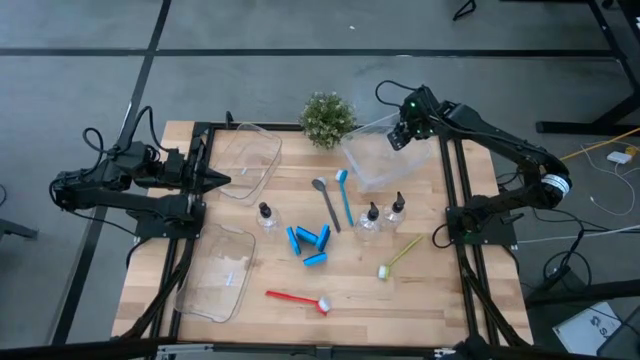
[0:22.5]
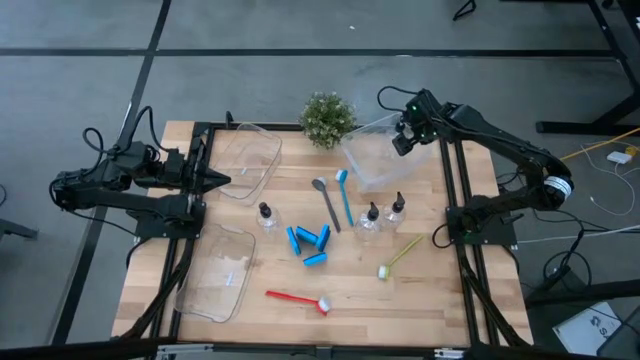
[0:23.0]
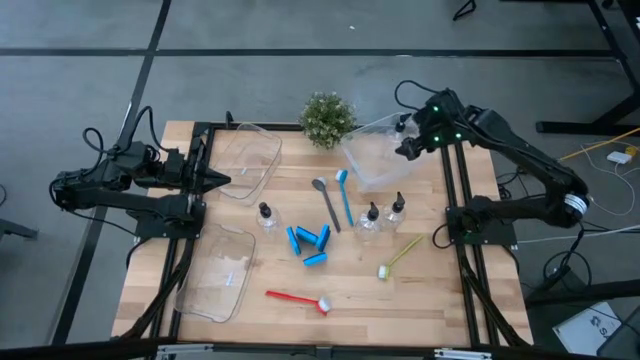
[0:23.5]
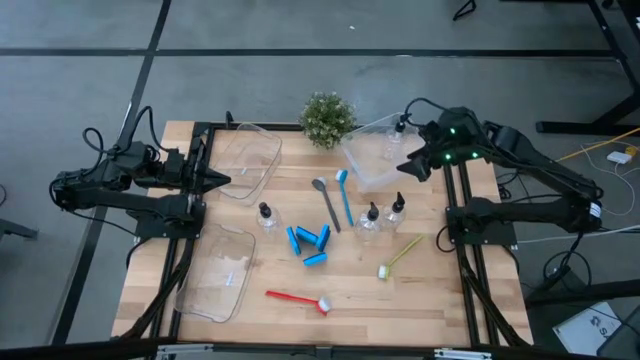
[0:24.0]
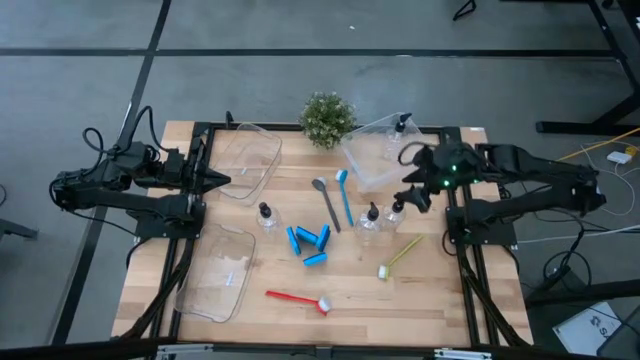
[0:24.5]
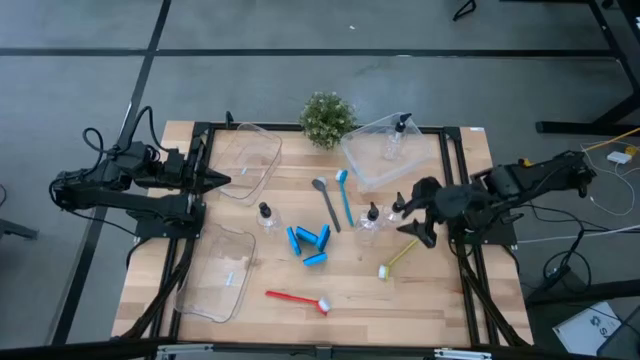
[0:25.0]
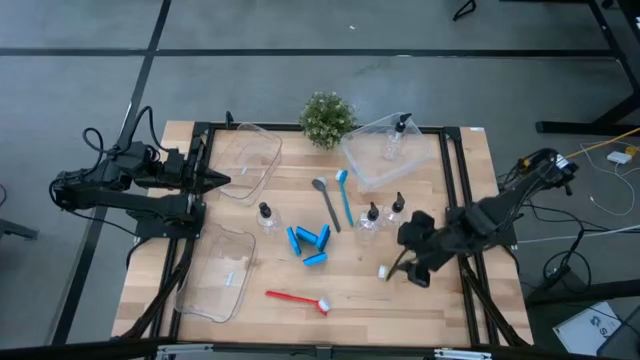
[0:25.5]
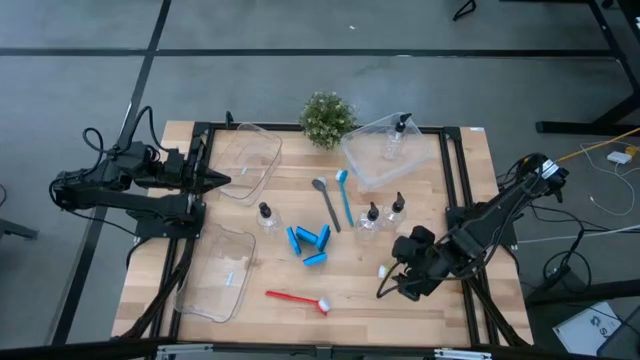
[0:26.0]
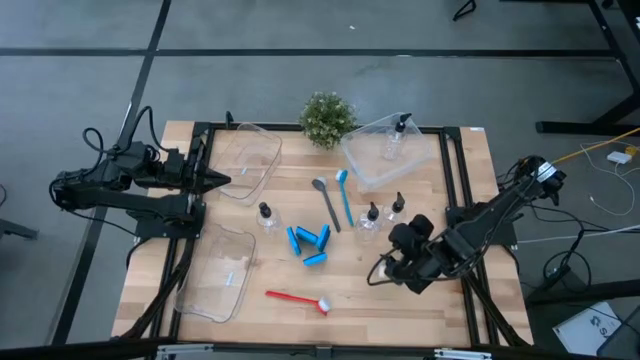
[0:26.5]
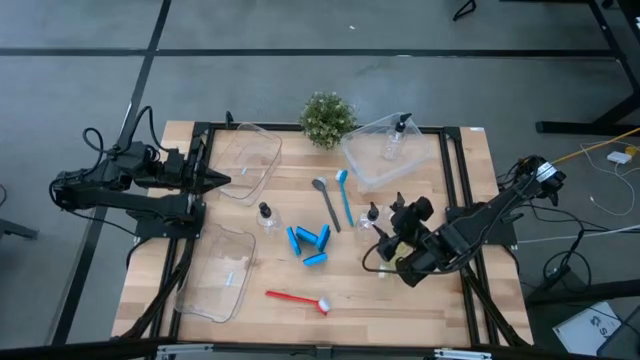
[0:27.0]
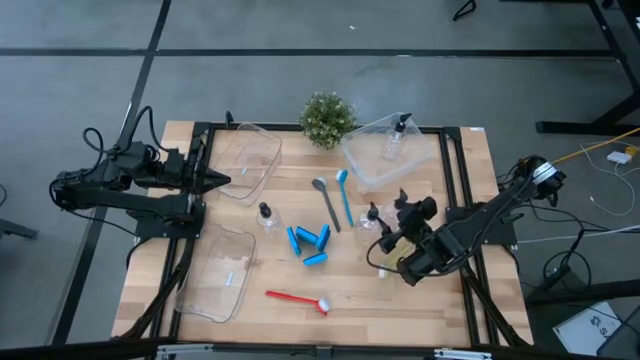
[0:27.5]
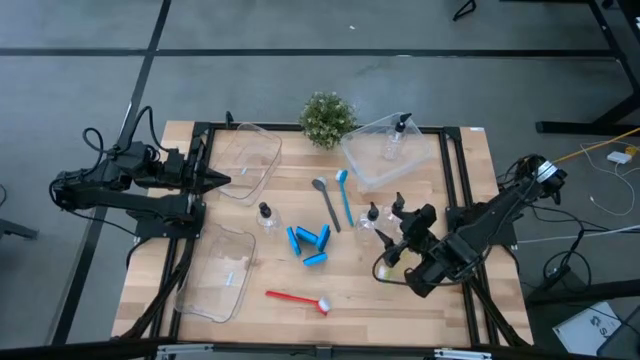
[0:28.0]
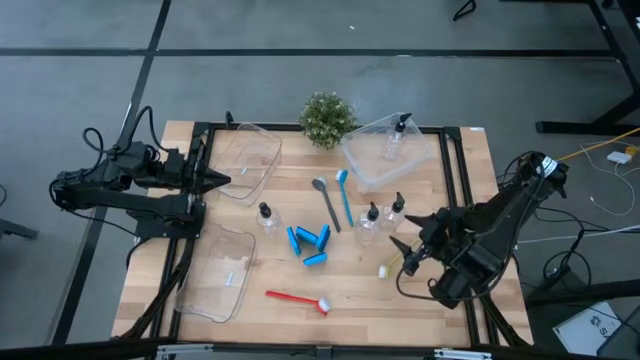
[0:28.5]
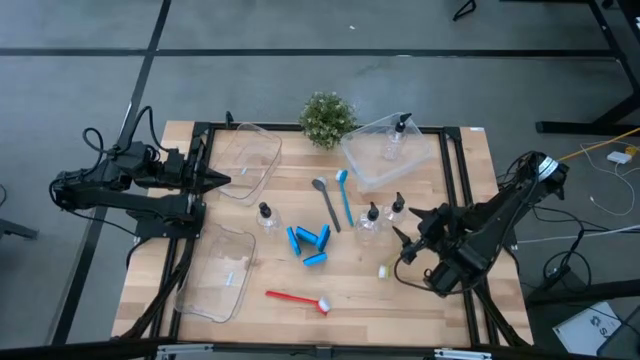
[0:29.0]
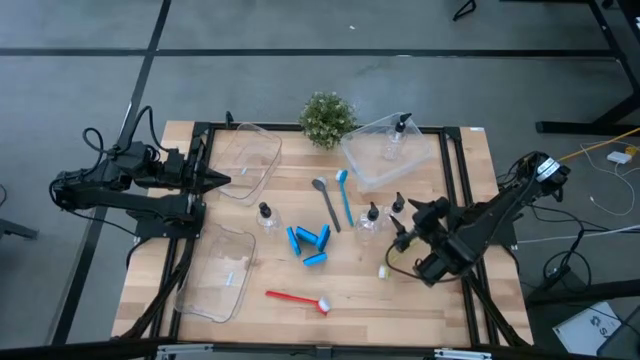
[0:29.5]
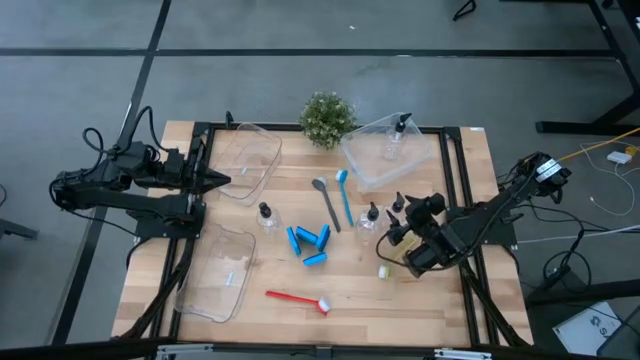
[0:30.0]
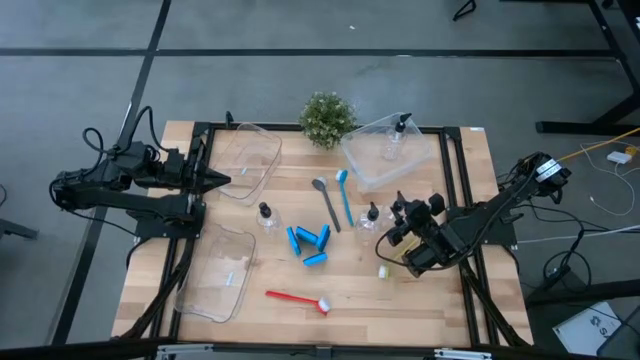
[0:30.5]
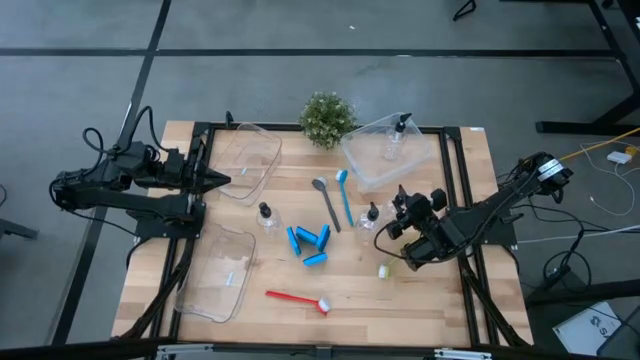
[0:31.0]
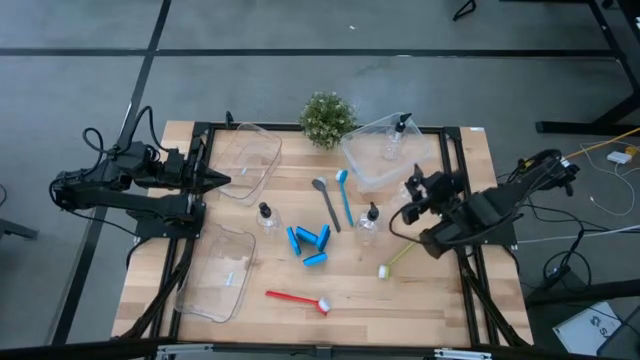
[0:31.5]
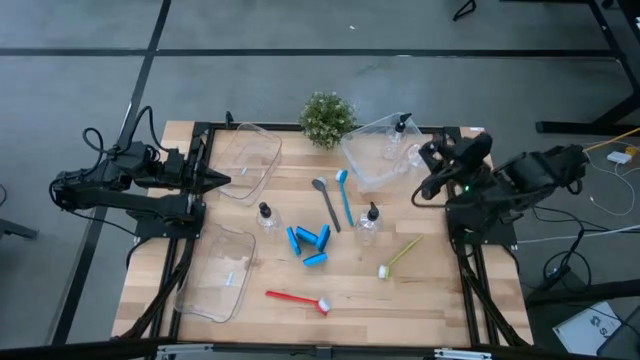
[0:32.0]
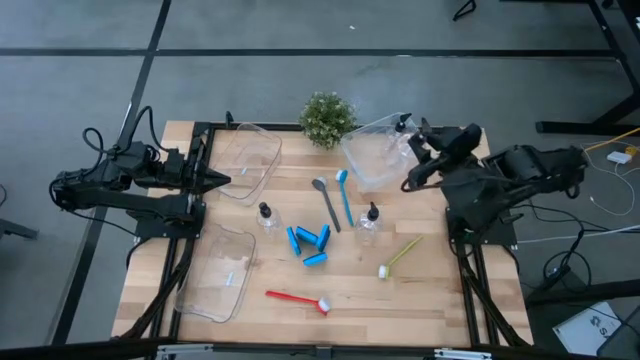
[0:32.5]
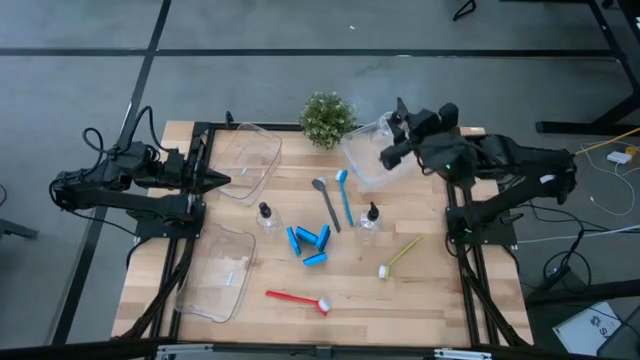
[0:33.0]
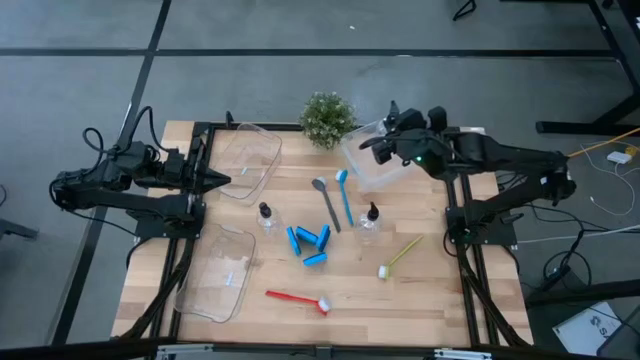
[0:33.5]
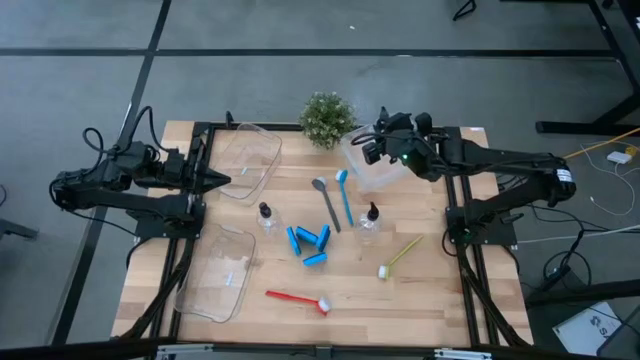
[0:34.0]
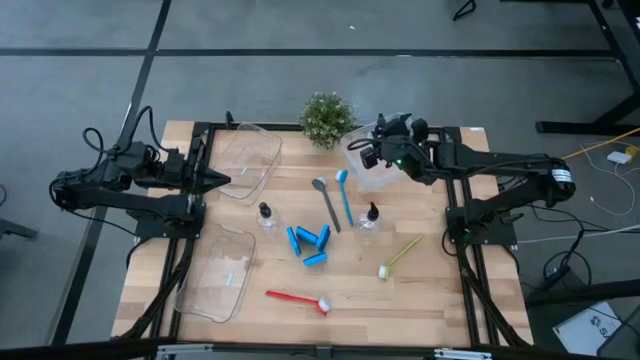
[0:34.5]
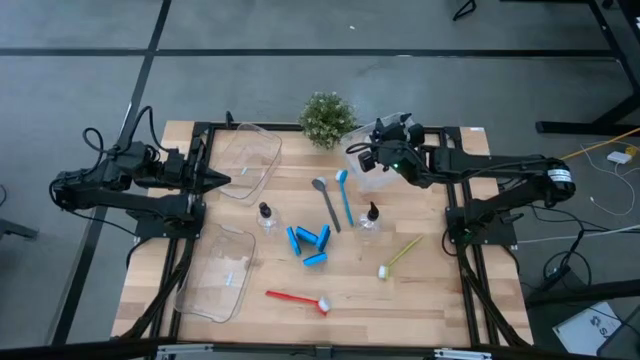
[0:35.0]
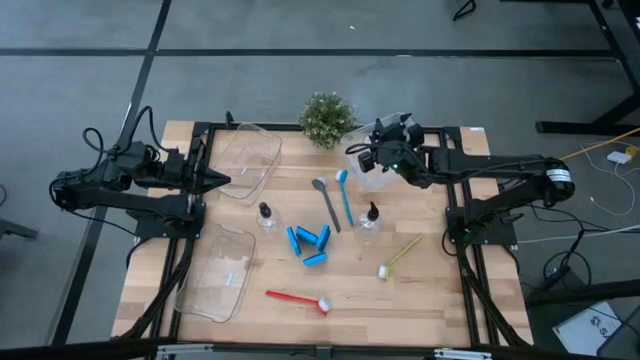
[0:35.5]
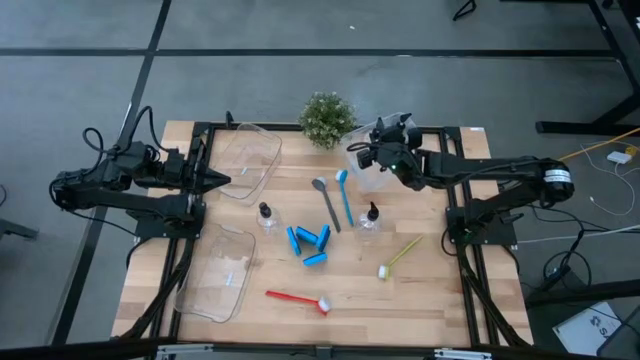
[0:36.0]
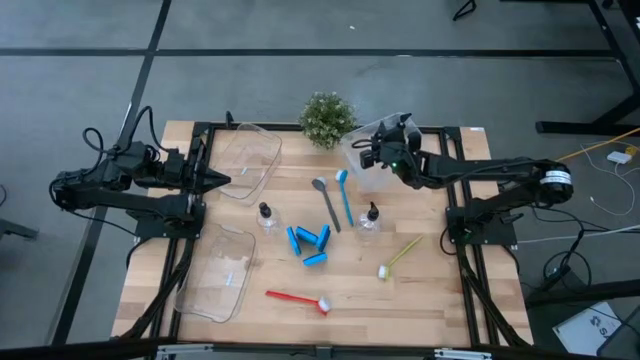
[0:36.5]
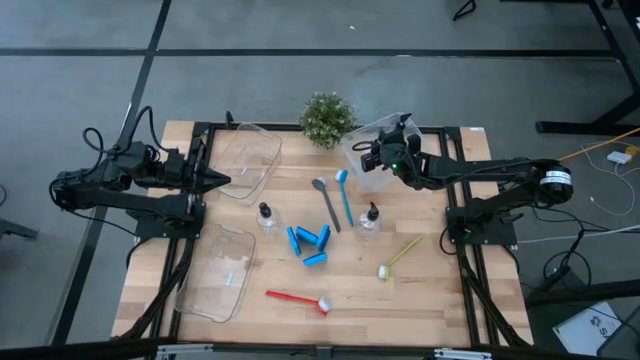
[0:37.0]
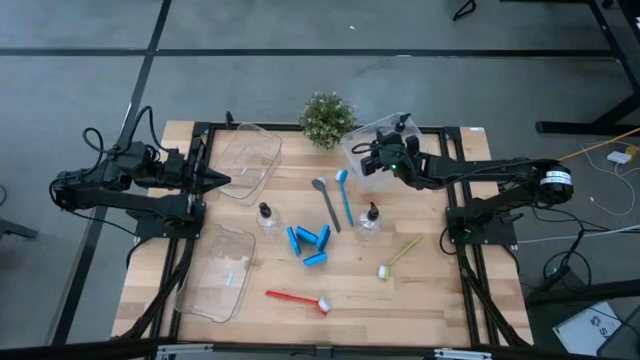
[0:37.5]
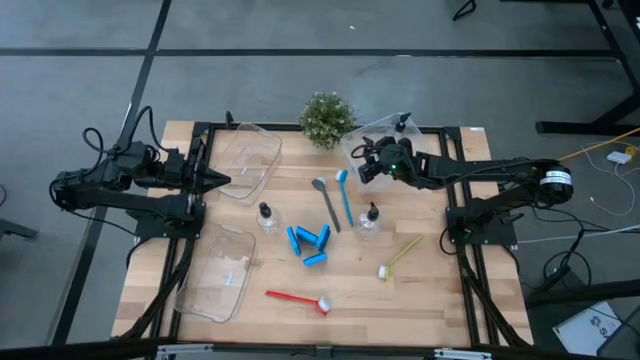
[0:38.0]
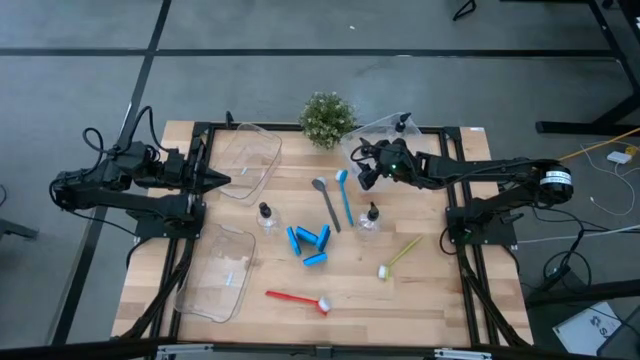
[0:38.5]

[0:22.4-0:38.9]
Task: Pick & Place Kitchen Sink Supplies
Put the soap dispenser into the white bin

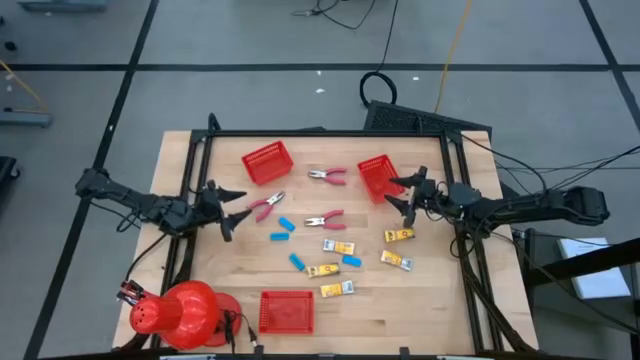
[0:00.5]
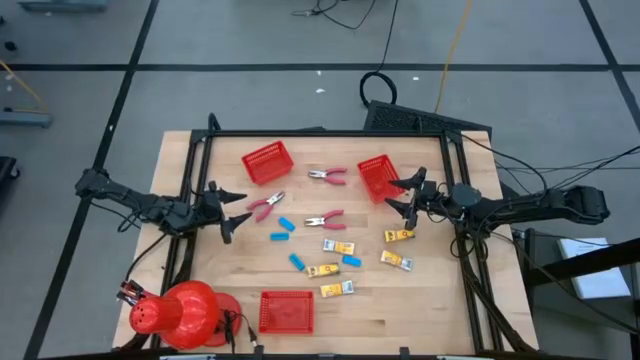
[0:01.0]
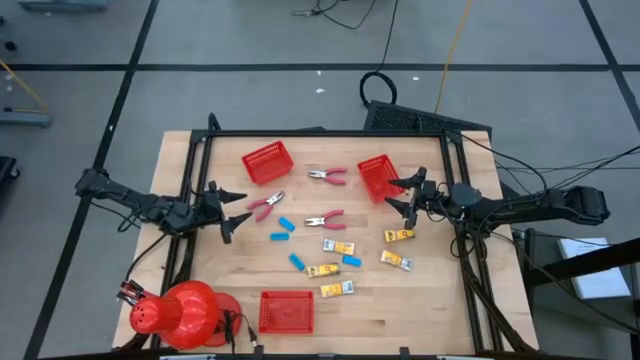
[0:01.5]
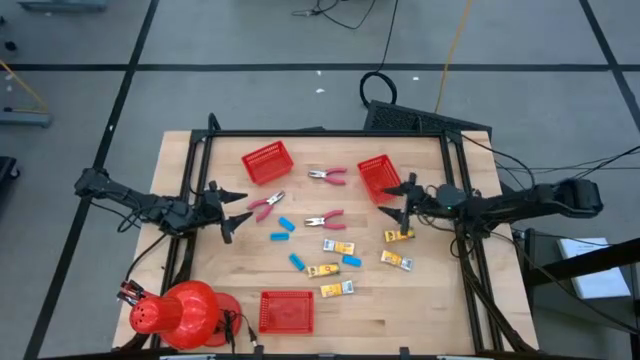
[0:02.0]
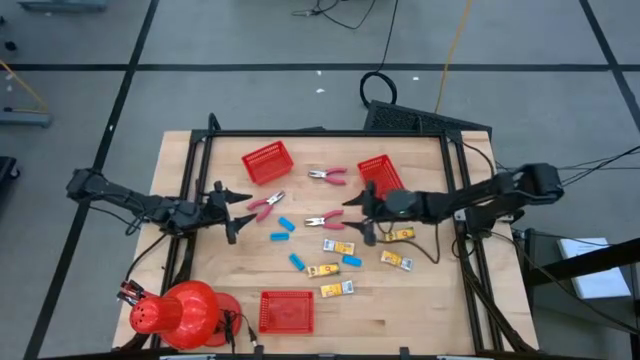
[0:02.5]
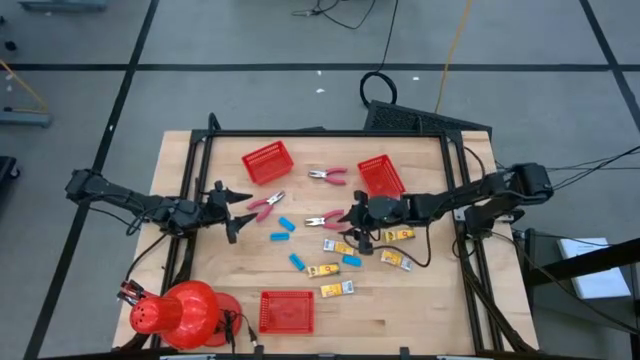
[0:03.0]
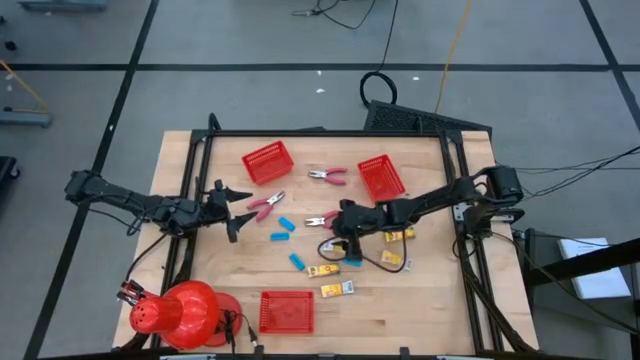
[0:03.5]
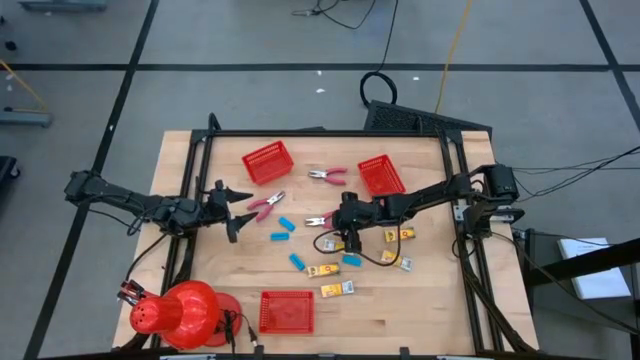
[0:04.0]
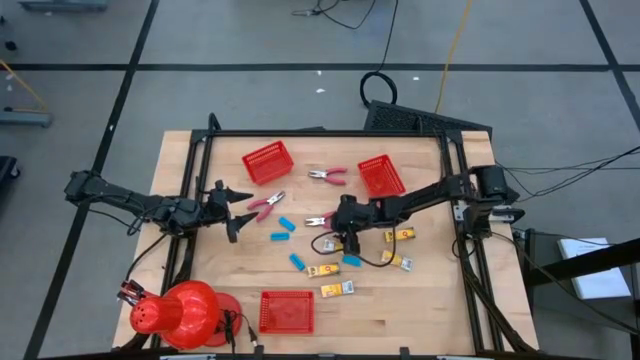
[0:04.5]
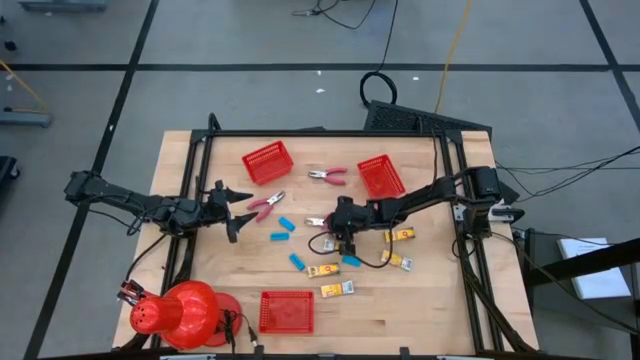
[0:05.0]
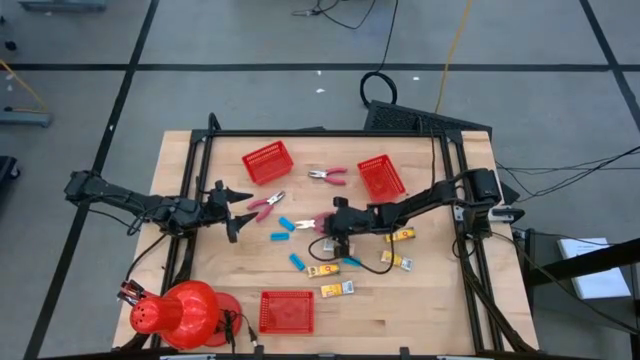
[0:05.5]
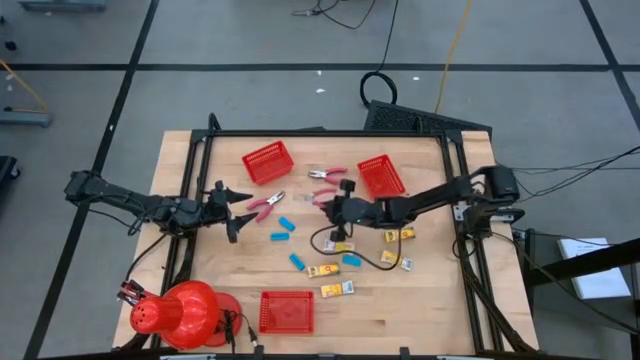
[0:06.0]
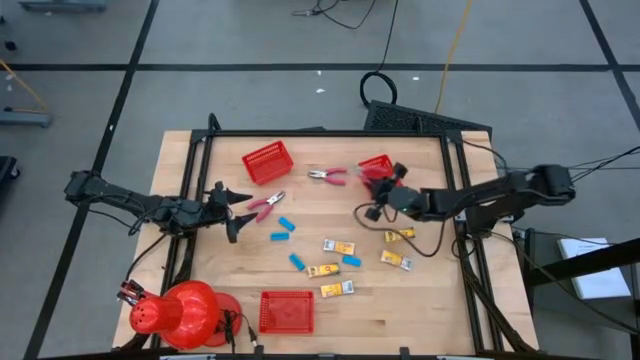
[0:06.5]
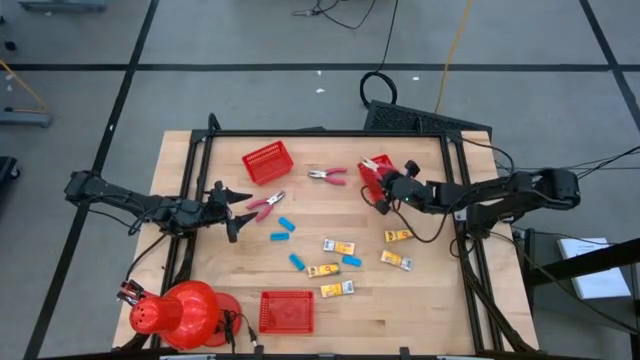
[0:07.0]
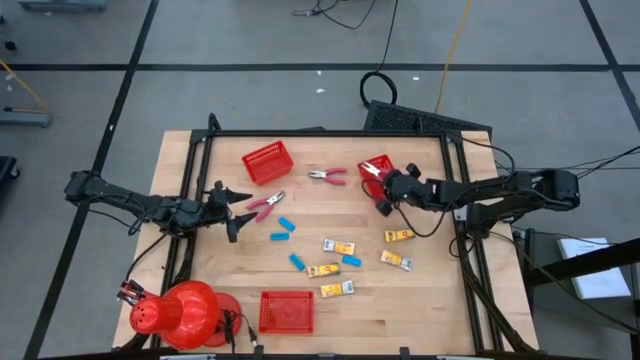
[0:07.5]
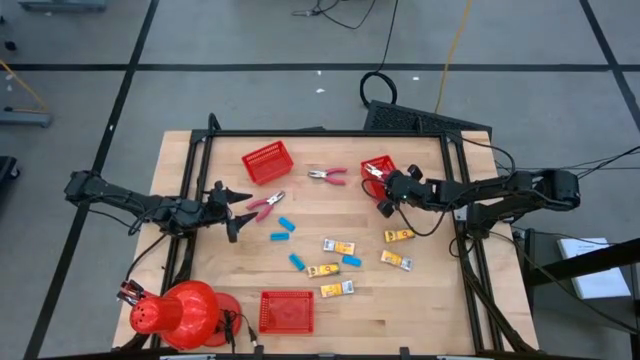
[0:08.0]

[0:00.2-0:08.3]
Task: Pick & Place School Supplies
Put the pink hole puncher into the top right red bin
